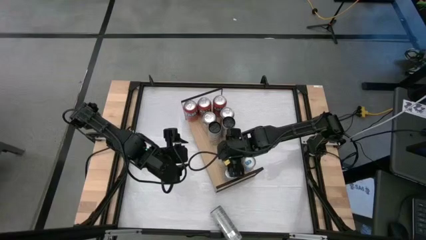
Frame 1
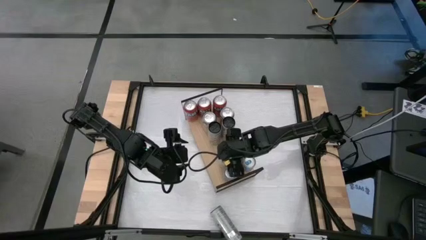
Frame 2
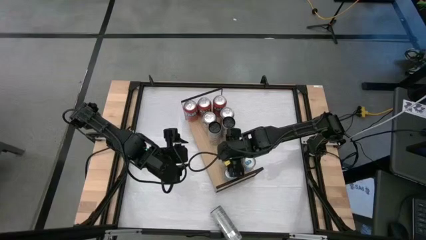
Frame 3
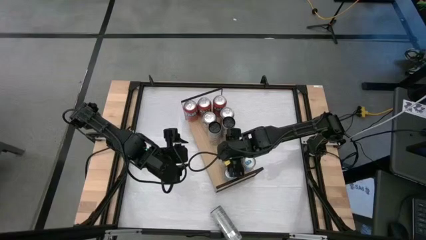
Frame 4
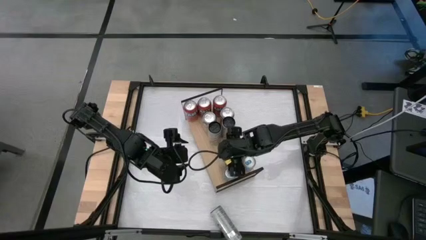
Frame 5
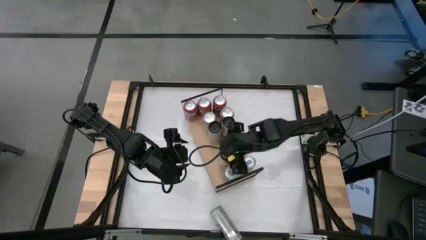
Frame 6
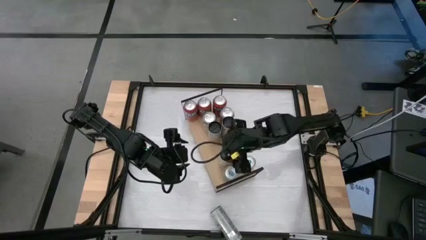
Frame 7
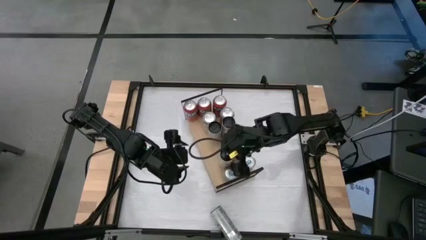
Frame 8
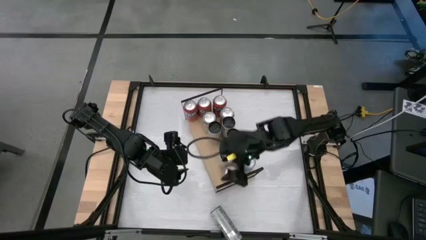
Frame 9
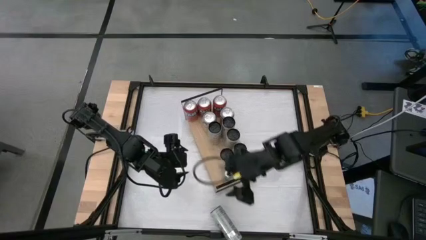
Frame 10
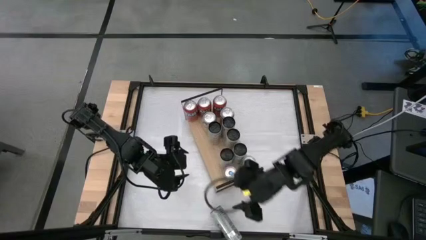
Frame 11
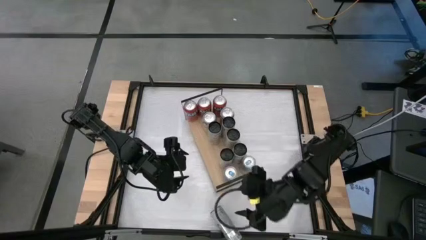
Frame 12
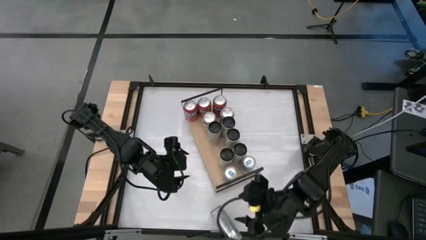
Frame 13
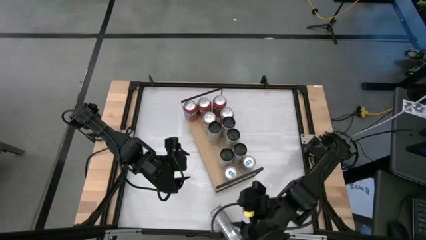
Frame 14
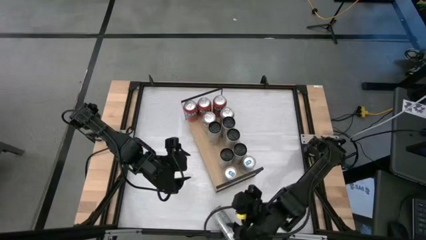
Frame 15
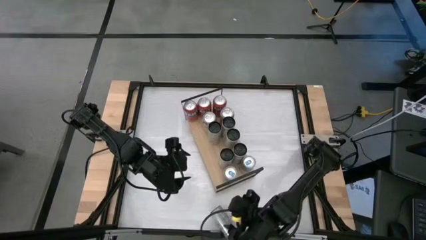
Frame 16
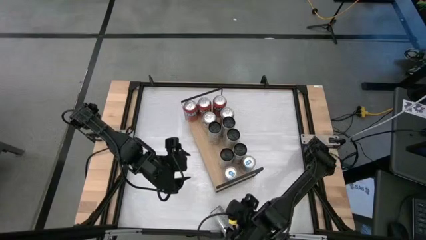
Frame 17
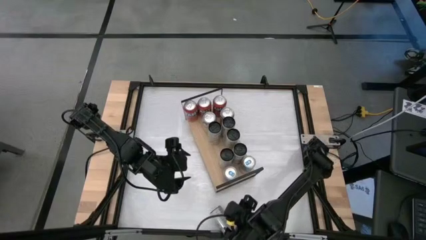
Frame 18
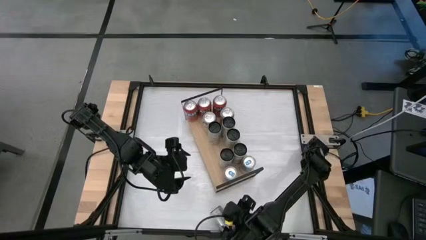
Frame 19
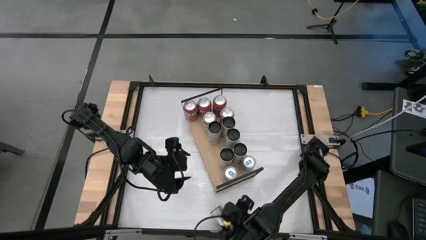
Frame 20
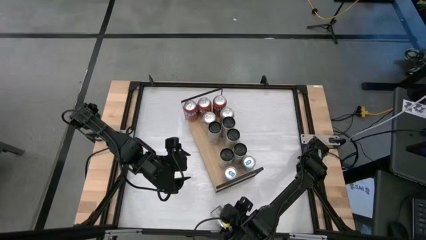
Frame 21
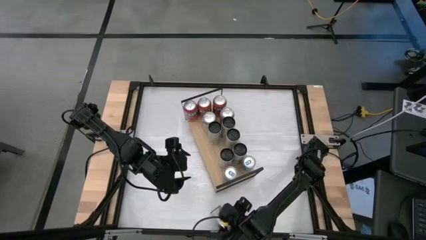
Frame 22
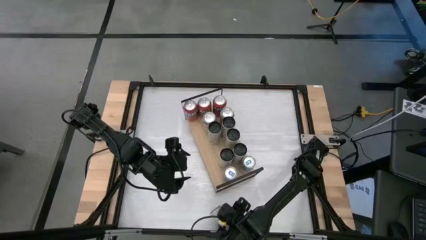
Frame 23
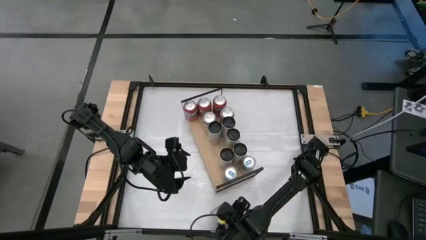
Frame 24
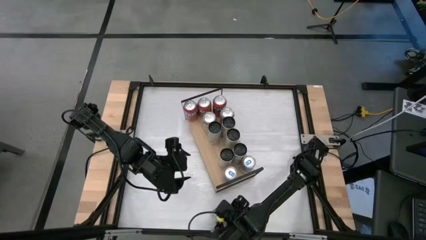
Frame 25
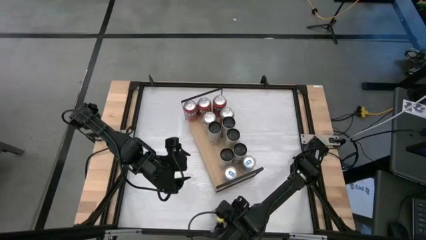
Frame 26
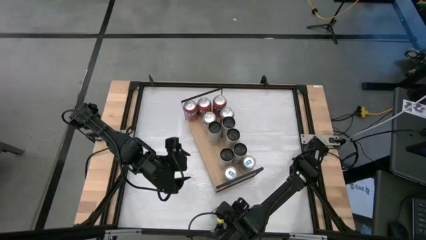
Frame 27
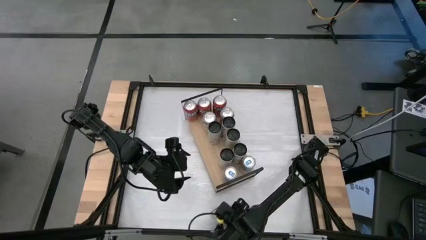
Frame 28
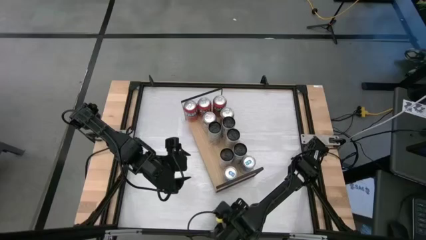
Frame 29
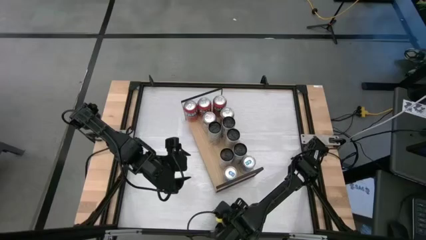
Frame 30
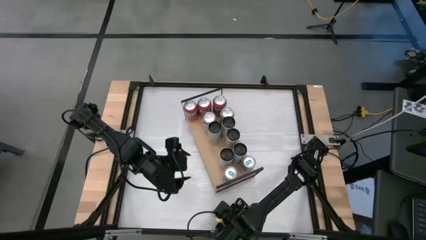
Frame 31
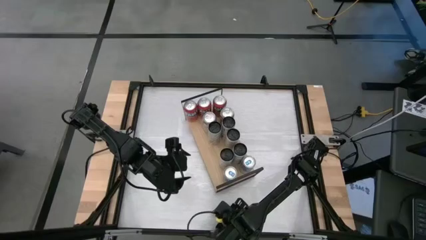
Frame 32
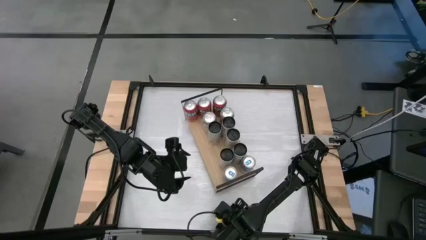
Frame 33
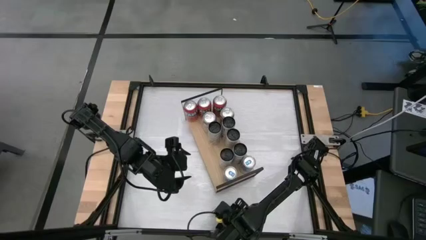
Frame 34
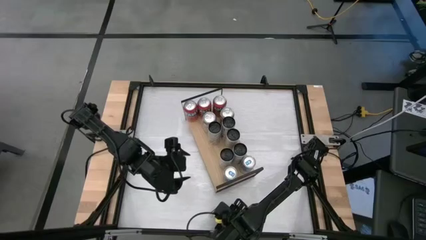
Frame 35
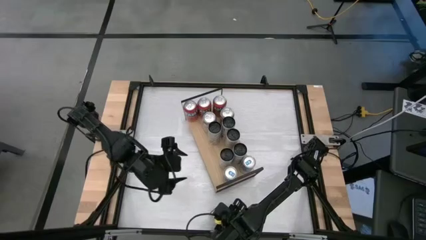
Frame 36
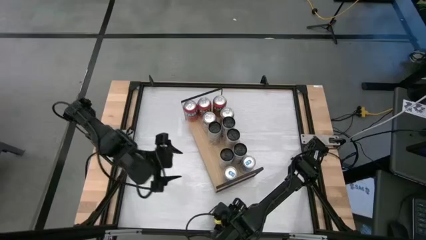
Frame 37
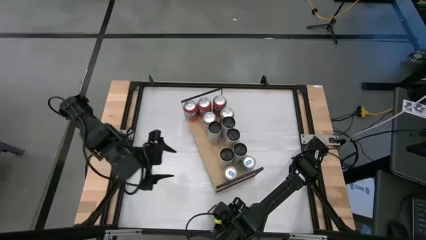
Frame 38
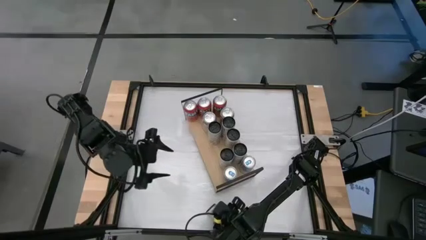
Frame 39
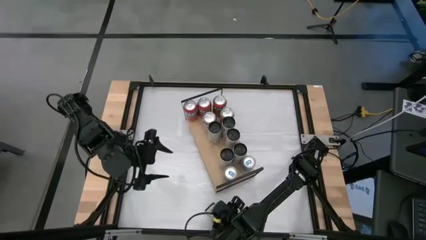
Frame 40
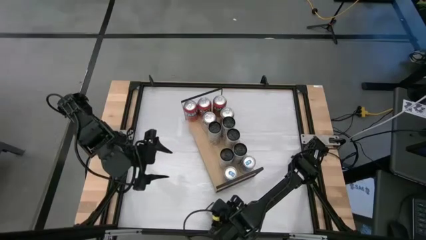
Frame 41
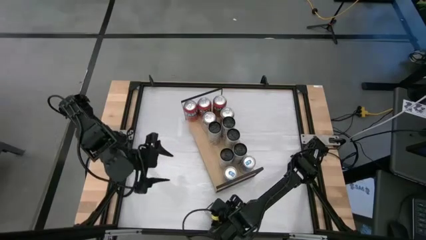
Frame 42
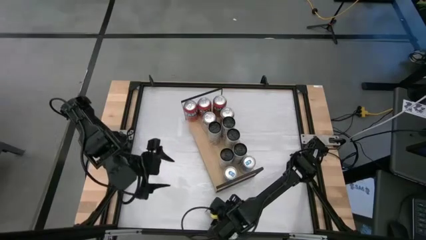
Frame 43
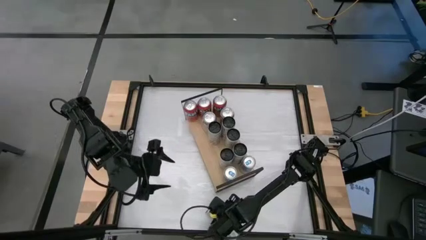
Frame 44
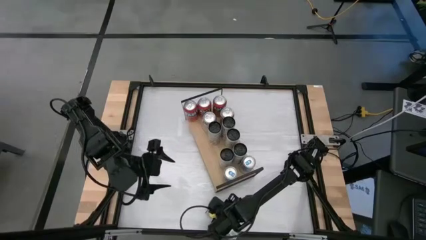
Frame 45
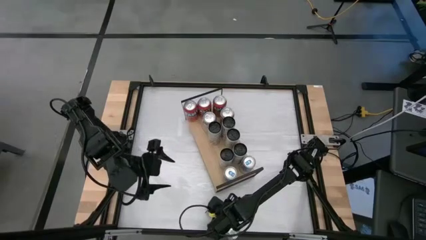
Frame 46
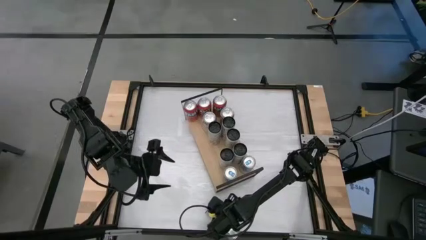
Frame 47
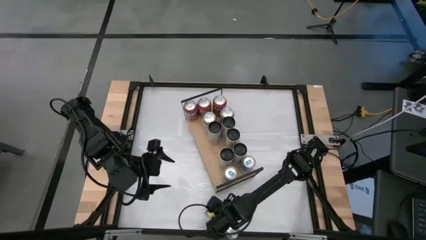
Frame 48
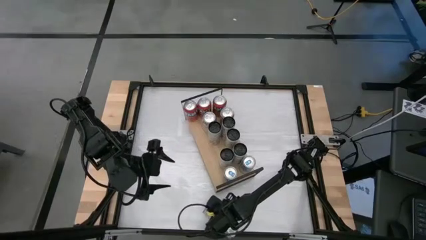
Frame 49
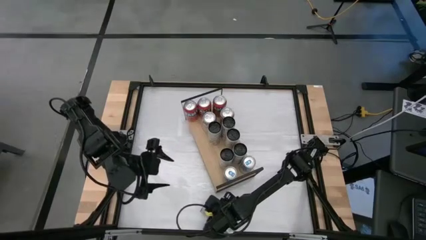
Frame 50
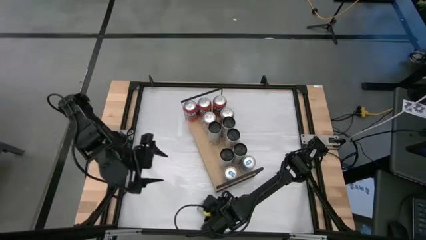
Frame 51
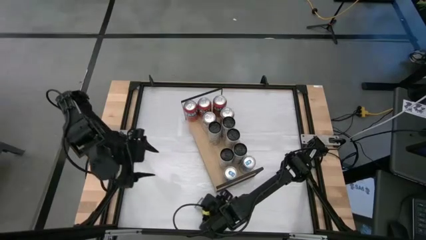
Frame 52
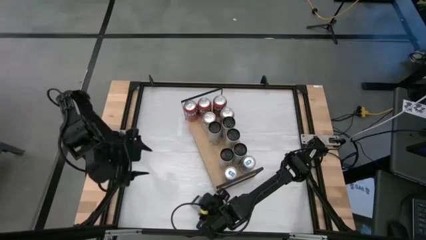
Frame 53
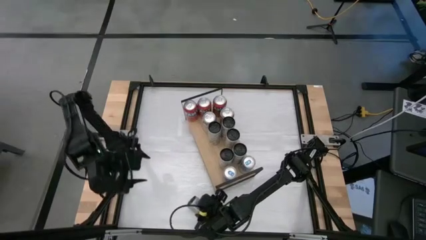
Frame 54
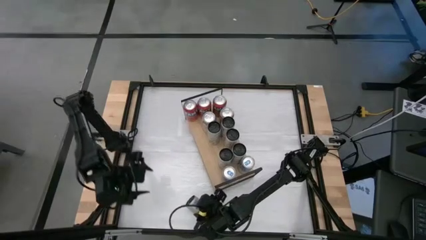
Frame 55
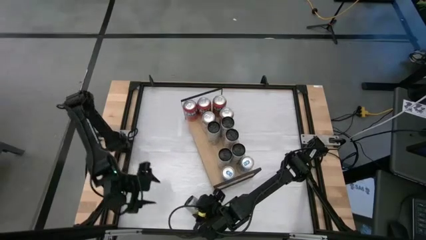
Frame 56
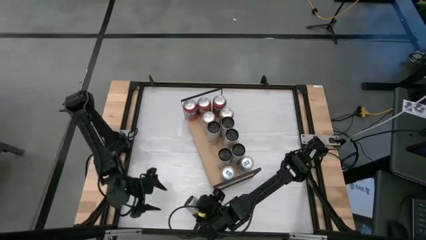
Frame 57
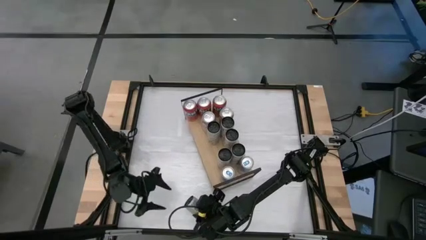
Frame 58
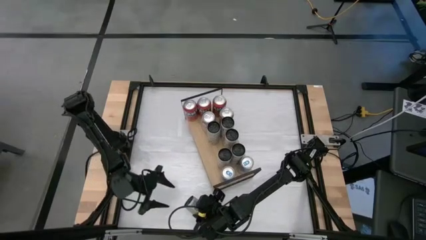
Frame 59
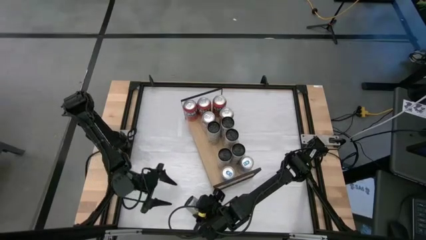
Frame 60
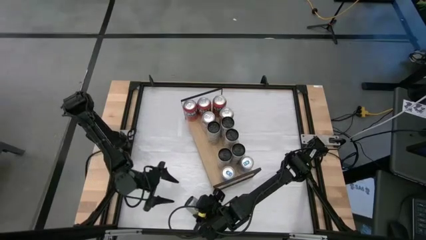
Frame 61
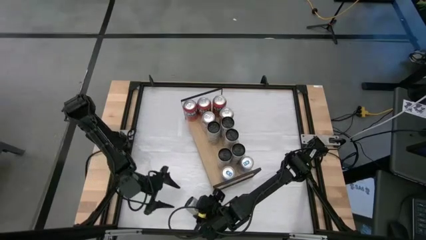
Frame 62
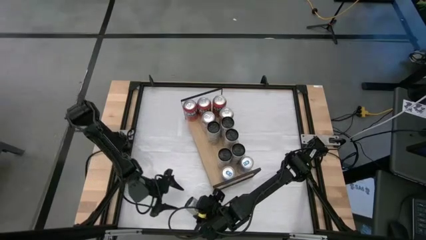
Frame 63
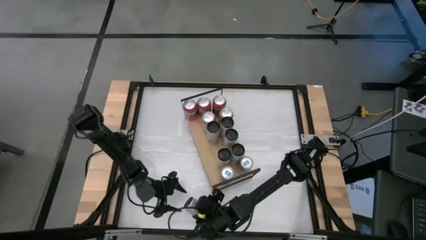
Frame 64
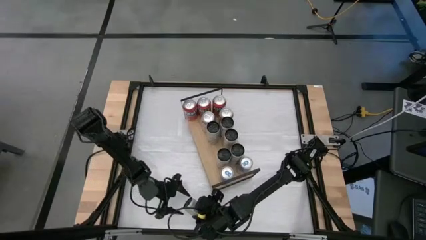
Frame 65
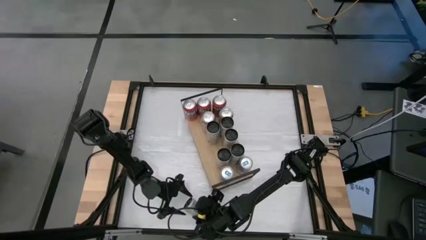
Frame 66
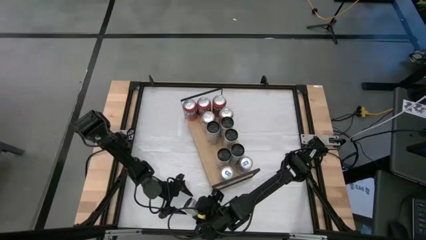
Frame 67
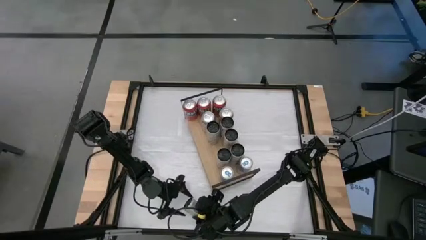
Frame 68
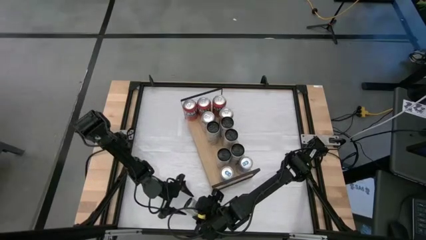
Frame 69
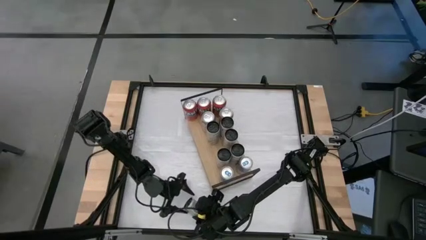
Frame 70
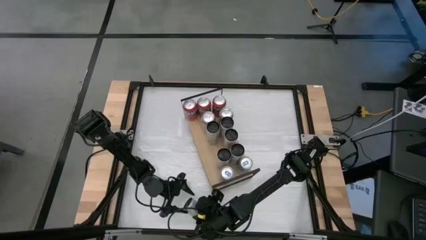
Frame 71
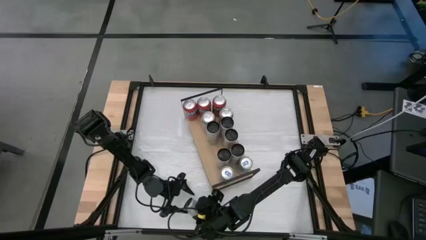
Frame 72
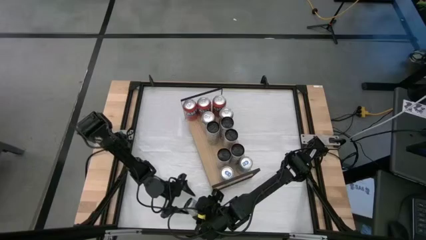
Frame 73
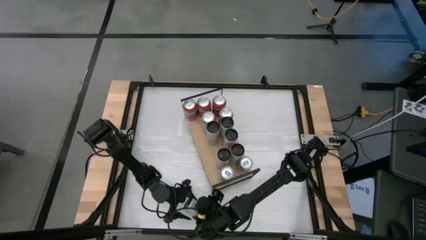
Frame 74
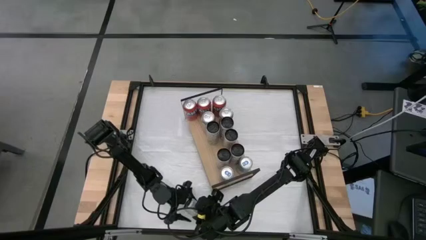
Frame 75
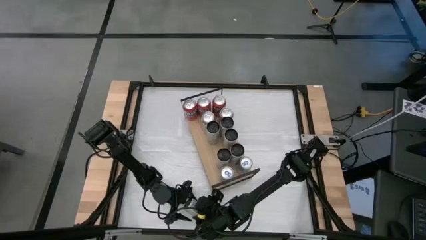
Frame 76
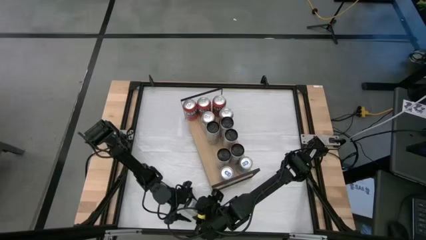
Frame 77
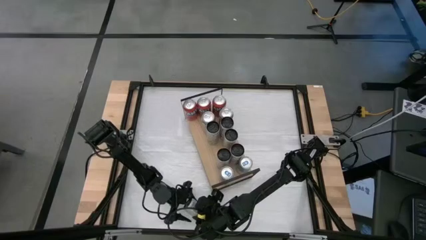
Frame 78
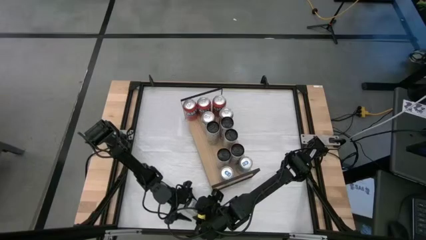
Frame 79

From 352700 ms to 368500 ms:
Task: Place canned beverage on shelf
Align the yellow soda can with the other yellow soda can
